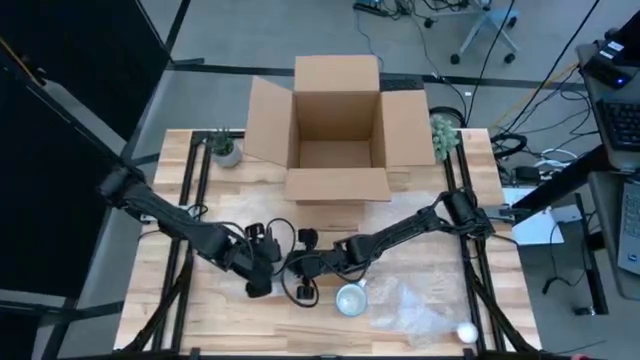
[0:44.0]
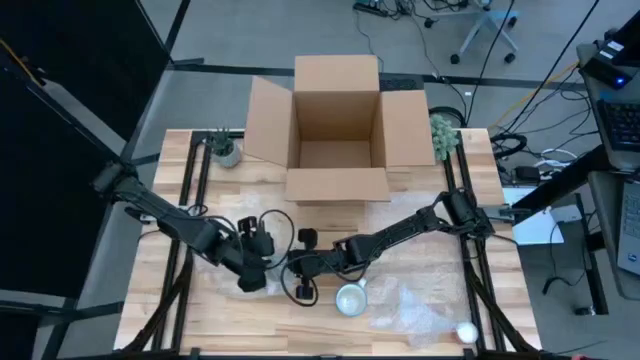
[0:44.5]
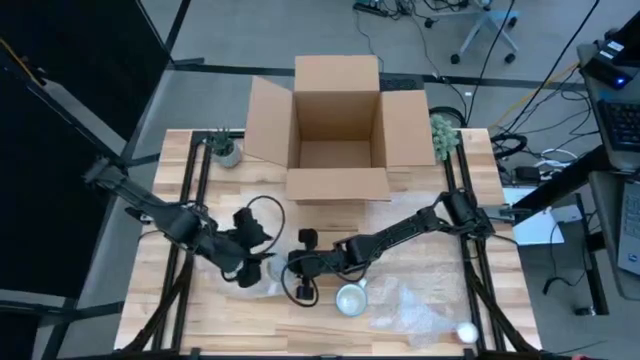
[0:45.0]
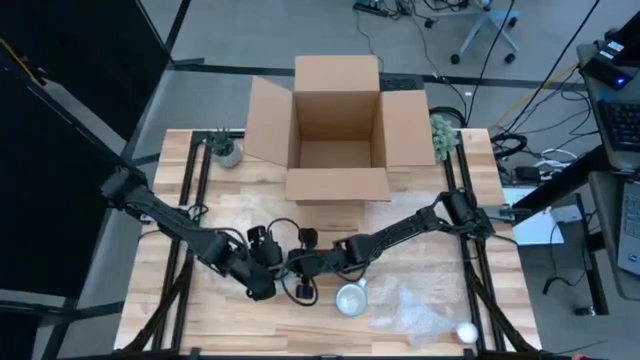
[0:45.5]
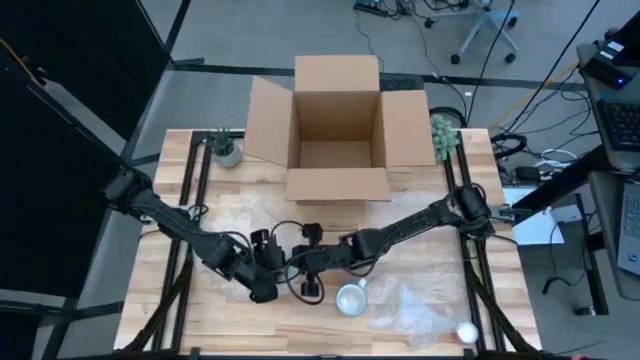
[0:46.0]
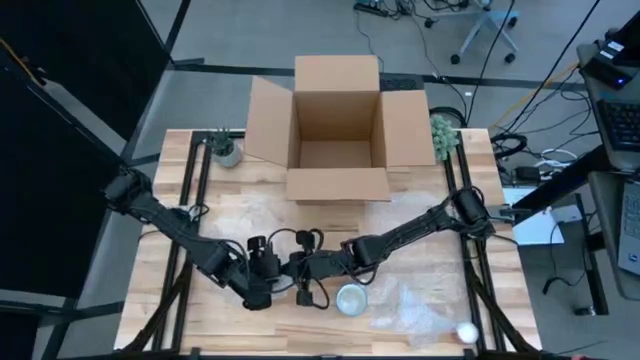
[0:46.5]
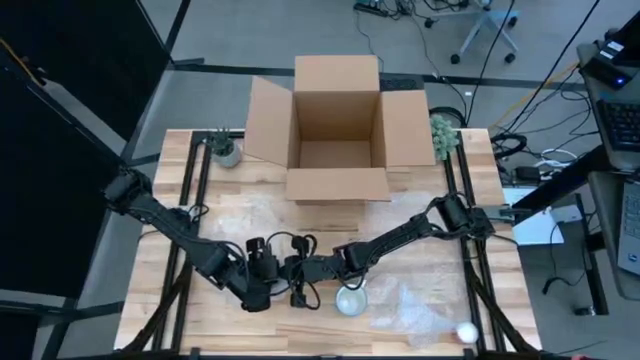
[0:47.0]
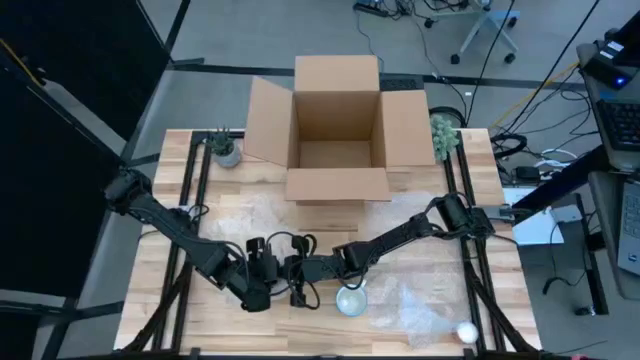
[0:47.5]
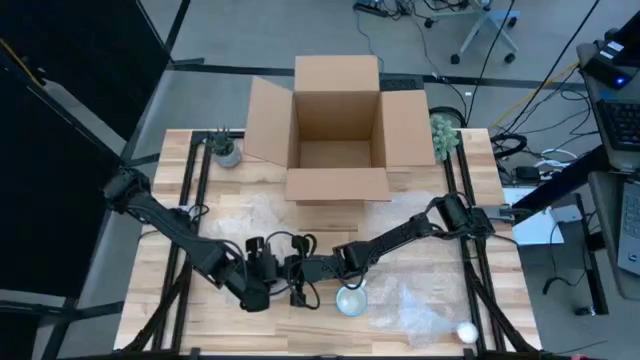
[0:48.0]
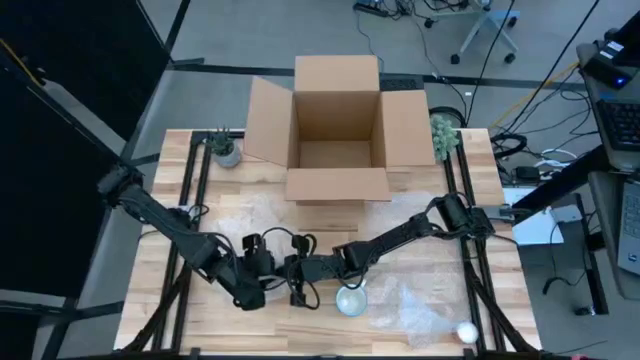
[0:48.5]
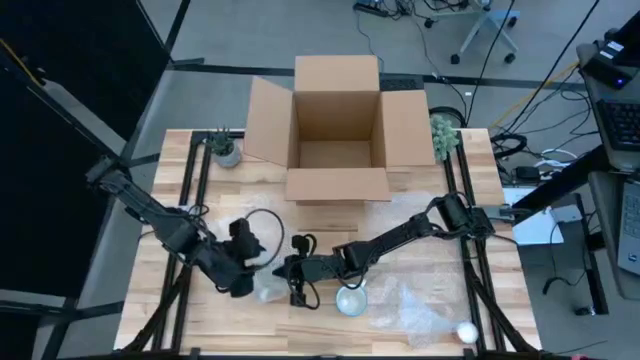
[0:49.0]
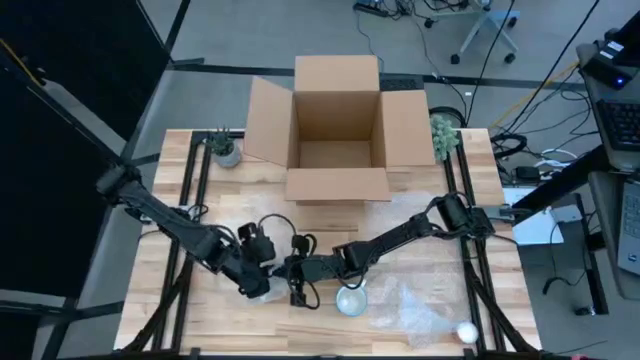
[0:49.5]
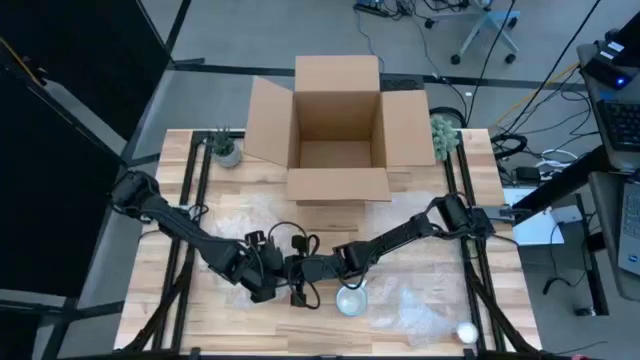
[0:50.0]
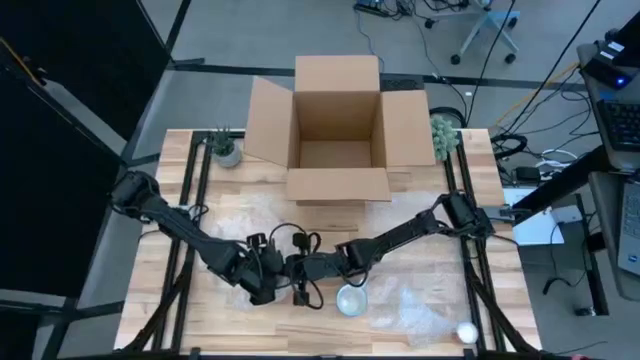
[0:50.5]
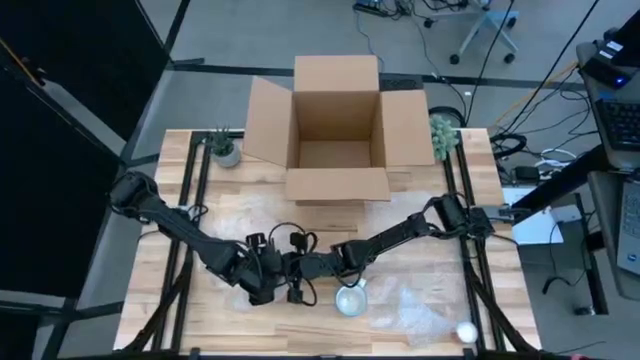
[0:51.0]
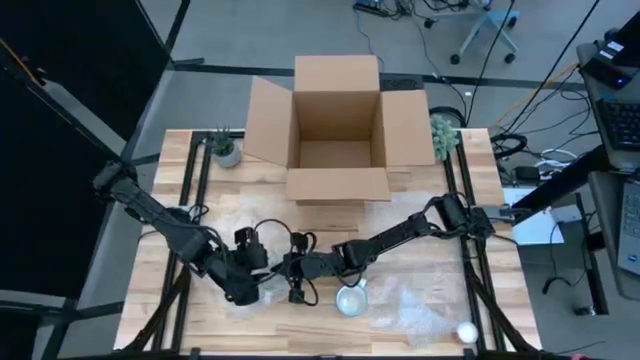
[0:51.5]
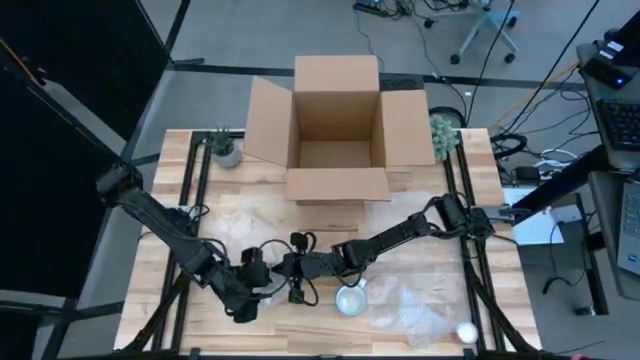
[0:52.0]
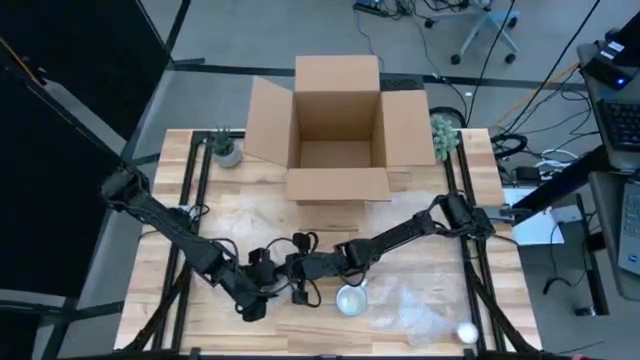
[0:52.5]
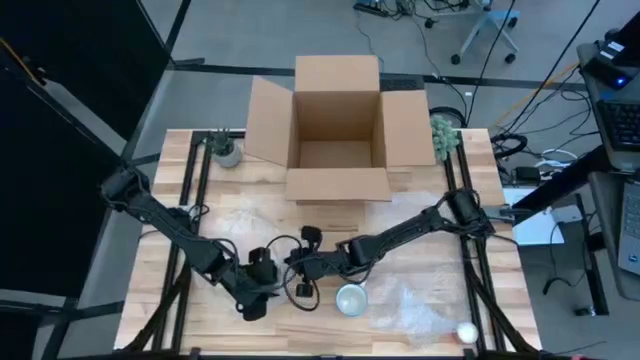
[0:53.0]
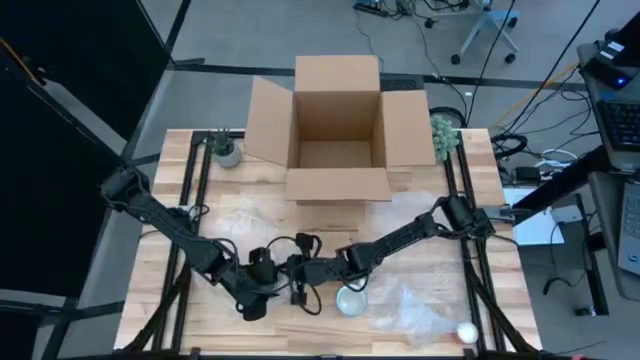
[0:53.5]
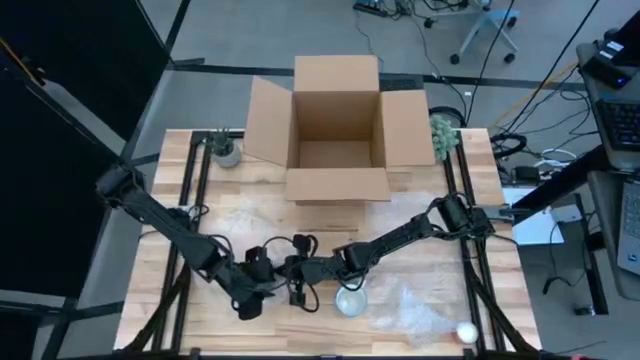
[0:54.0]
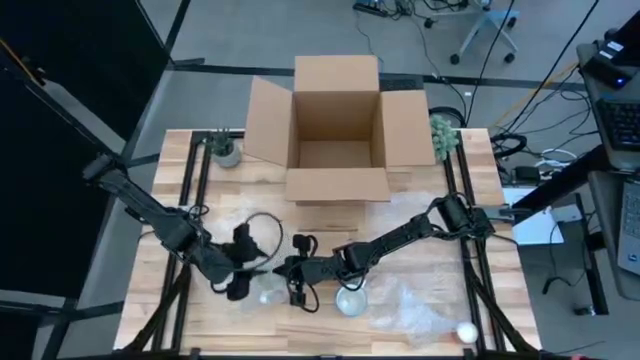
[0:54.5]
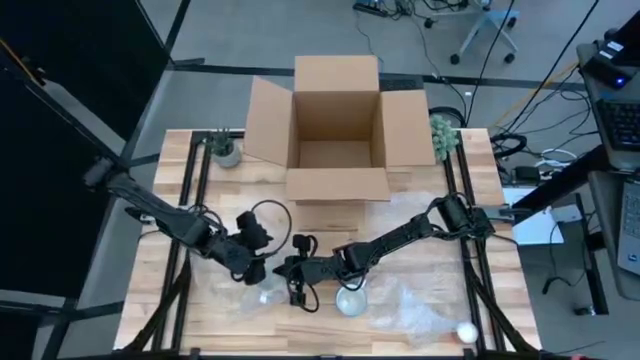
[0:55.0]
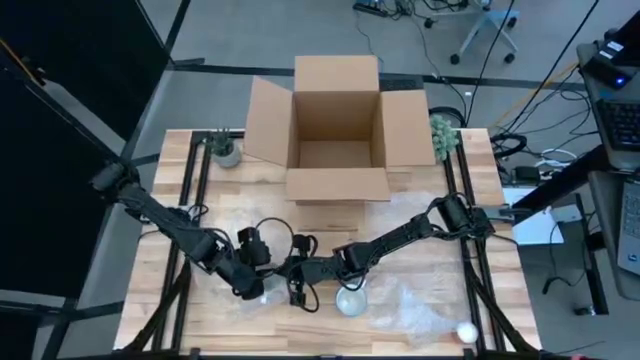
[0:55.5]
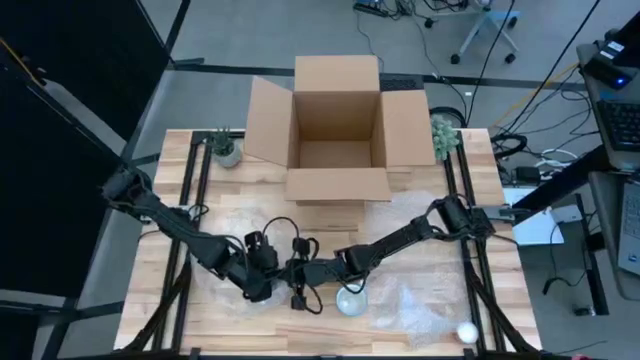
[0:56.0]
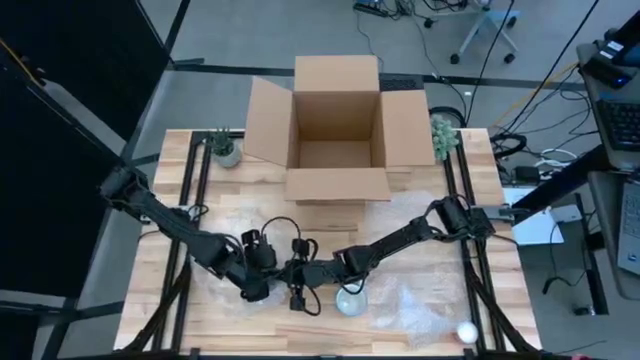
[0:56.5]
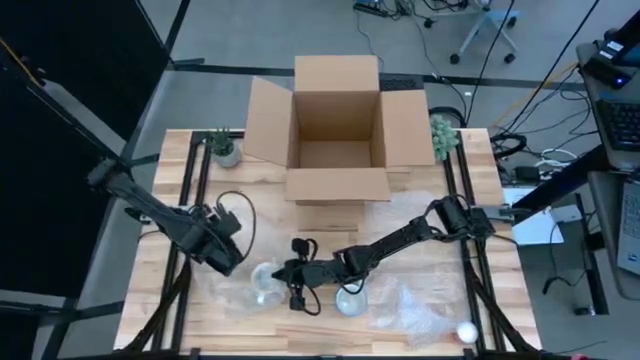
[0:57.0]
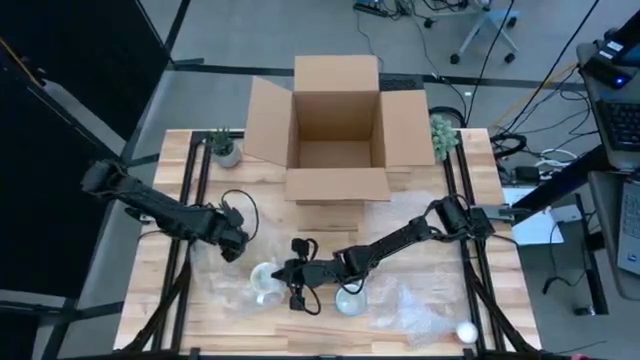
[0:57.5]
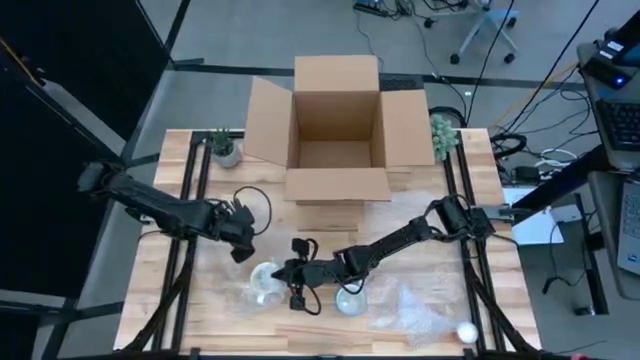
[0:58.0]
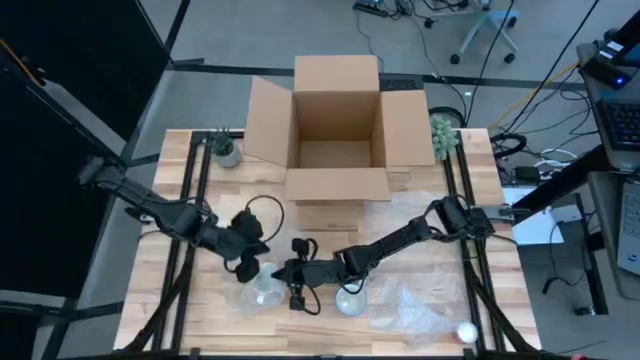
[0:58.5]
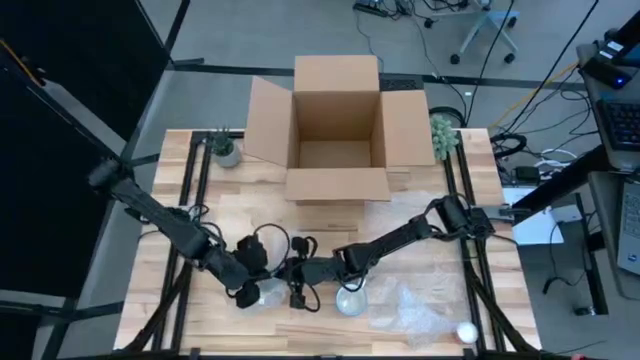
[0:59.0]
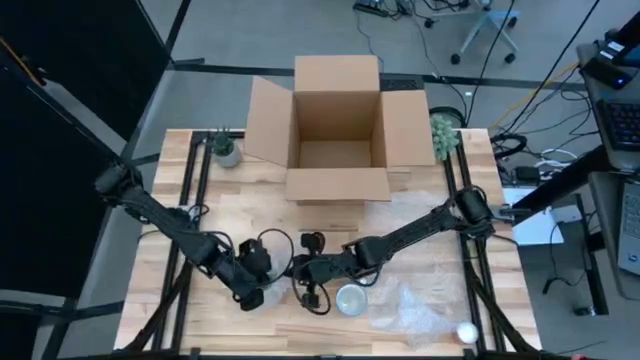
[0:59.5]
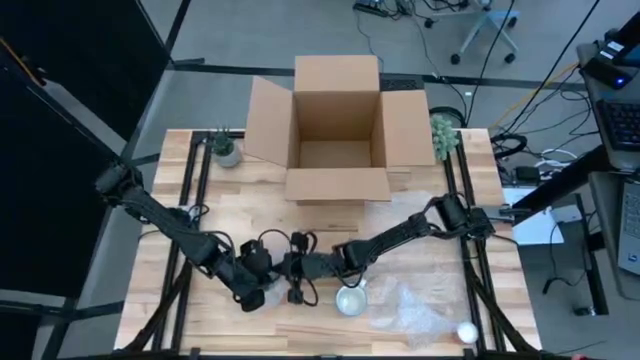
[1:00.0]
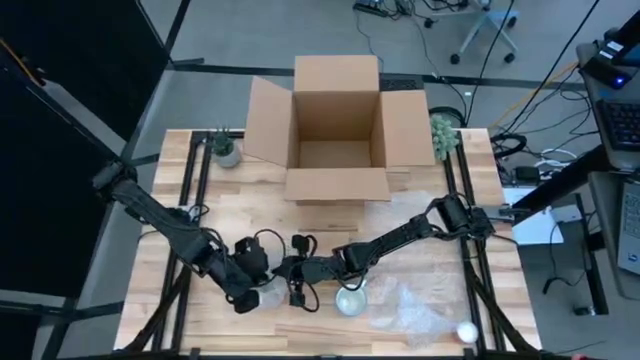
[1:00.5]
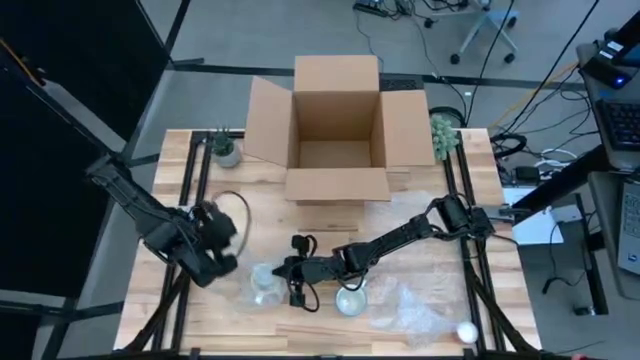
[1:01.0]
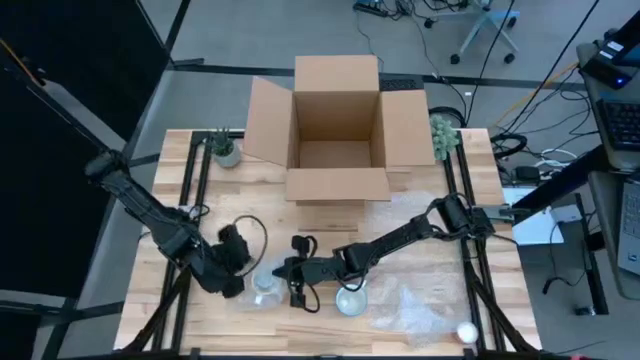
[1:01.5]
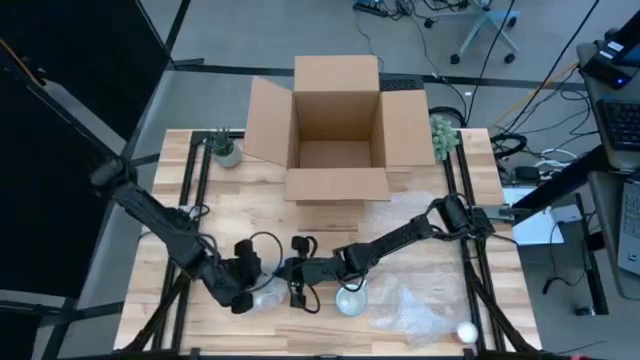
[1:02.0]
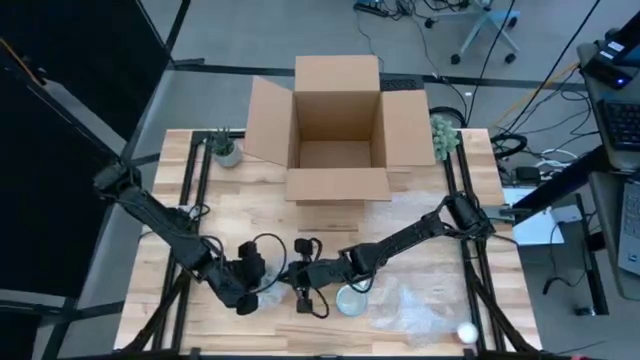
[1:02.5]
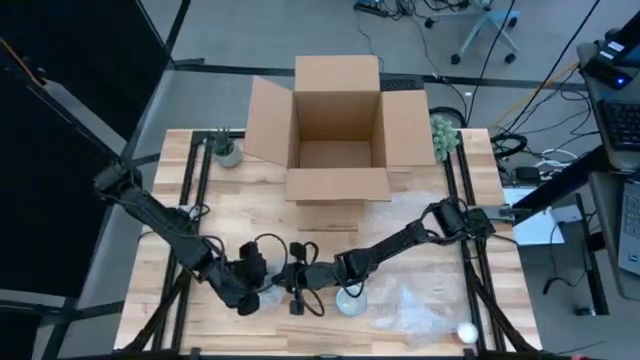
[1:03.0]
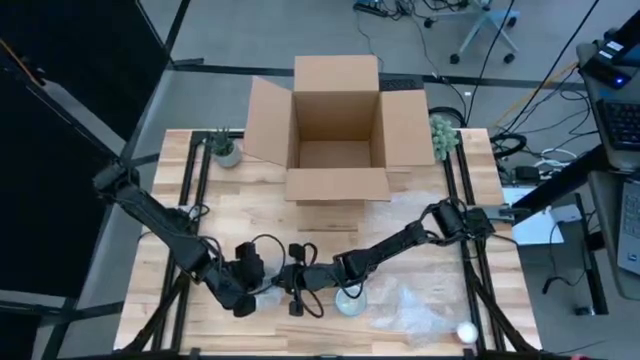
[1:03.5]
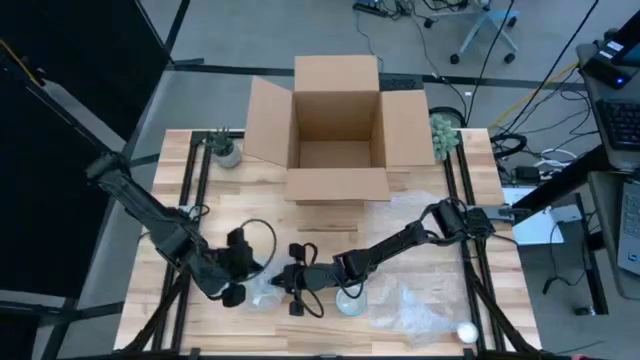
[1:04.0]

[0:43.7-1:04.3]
Task: wrap mug
Wrap the yellow mug with the left bubble wrap

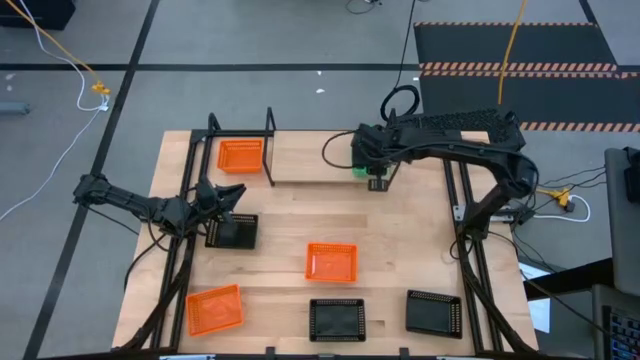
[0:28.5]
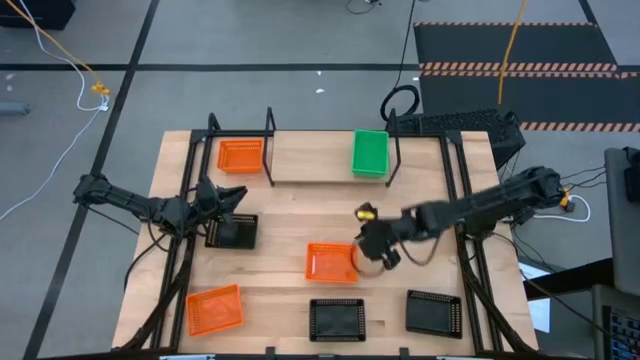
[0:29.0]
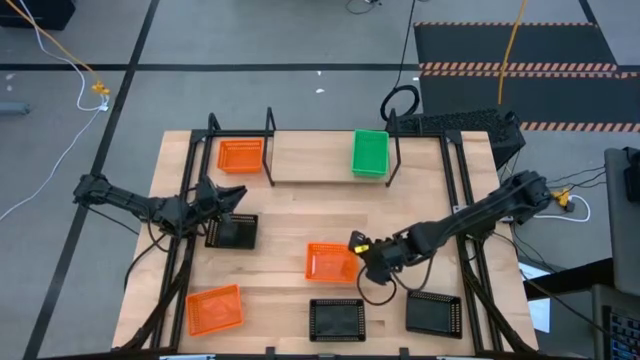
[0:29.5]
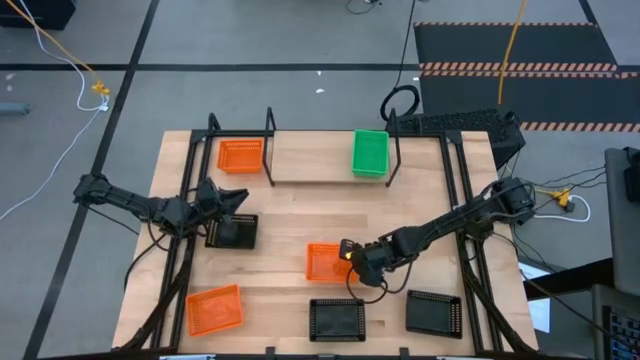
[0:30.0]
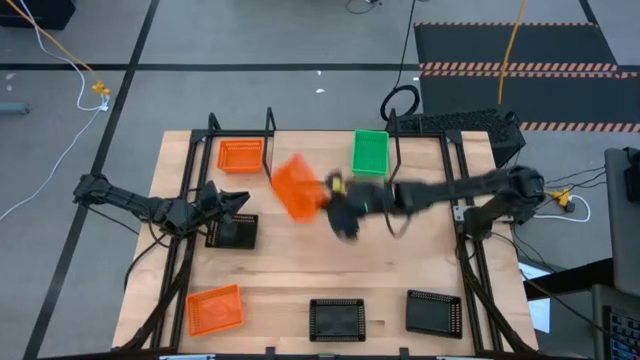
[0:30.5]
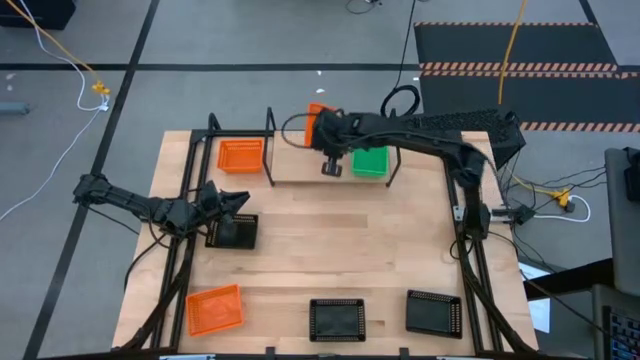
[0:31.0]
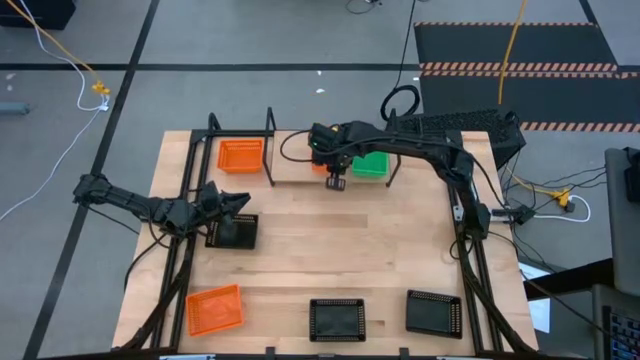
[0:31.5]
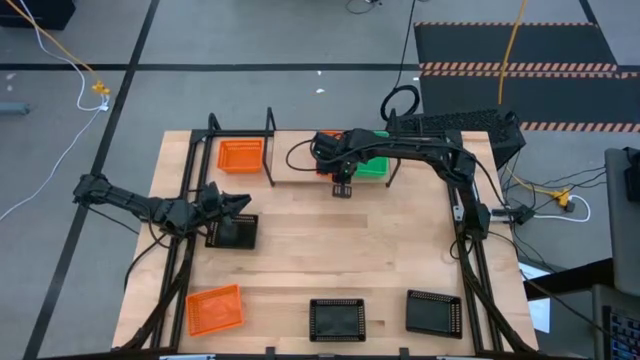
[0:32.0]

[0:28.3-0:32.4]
Task: Stack baskets on shelf by color
Put the bottom right orange bin on the shelf
